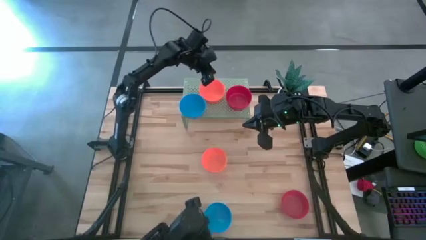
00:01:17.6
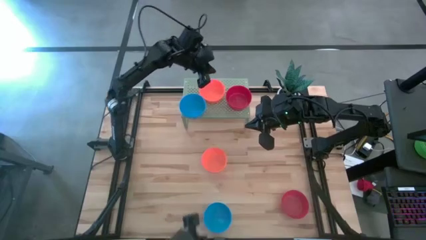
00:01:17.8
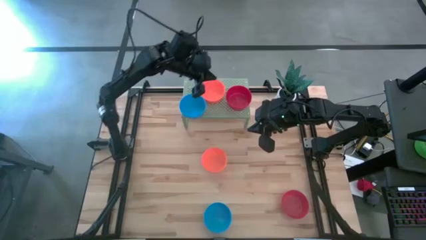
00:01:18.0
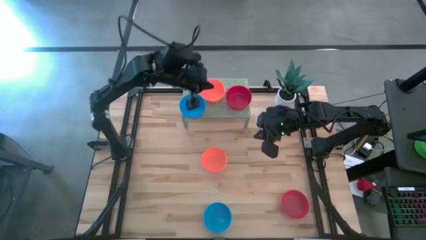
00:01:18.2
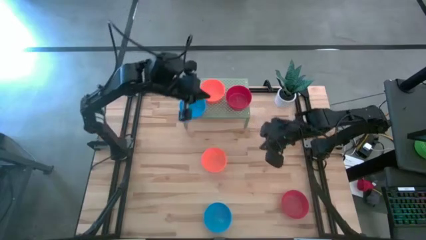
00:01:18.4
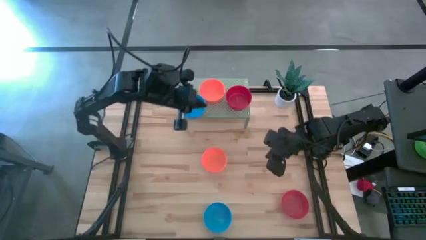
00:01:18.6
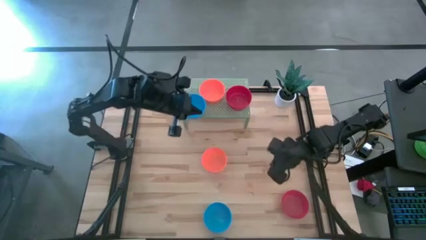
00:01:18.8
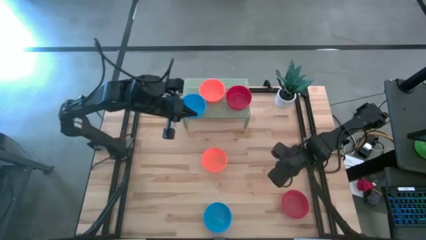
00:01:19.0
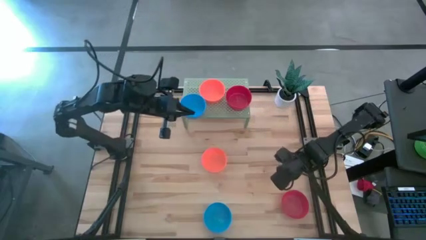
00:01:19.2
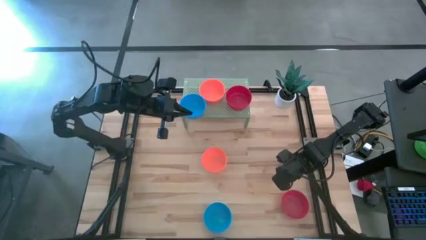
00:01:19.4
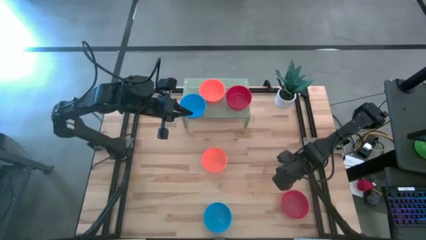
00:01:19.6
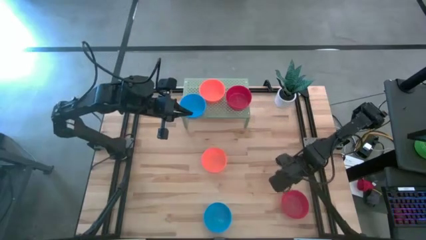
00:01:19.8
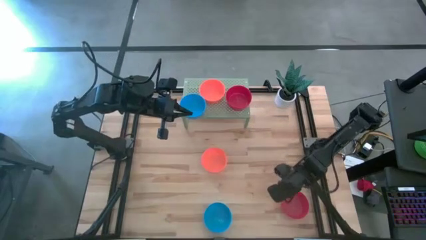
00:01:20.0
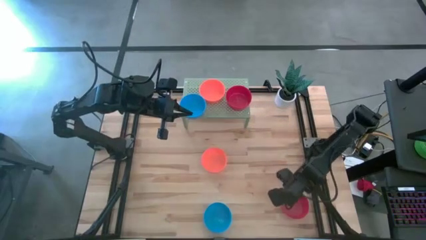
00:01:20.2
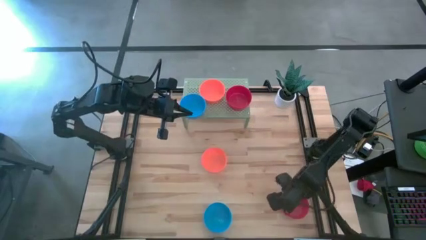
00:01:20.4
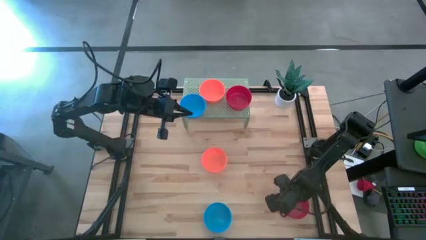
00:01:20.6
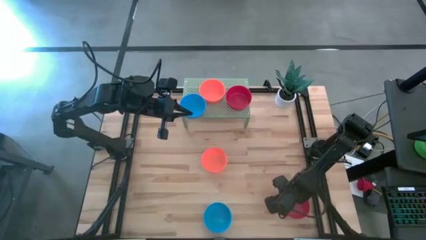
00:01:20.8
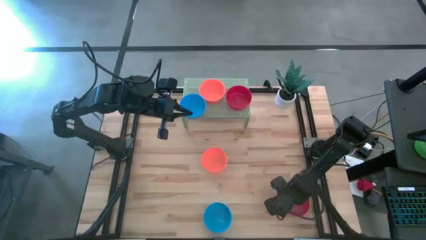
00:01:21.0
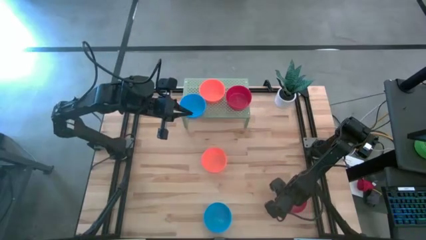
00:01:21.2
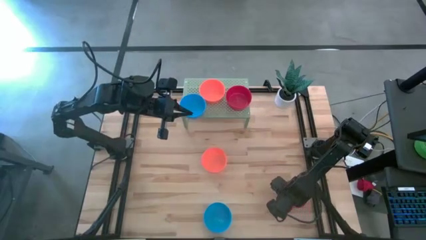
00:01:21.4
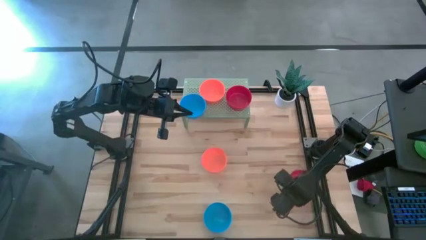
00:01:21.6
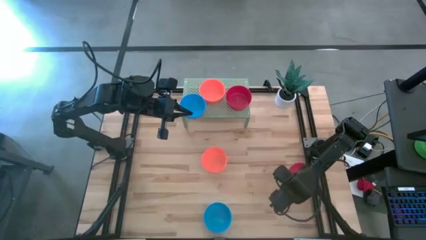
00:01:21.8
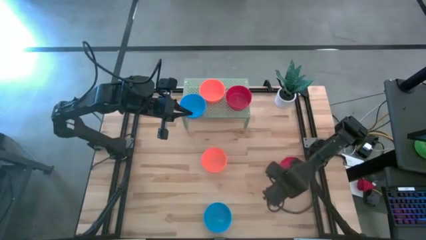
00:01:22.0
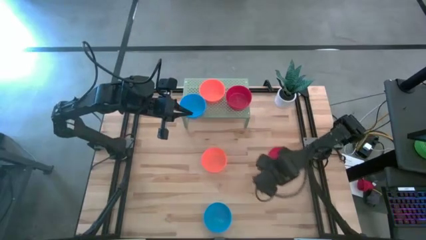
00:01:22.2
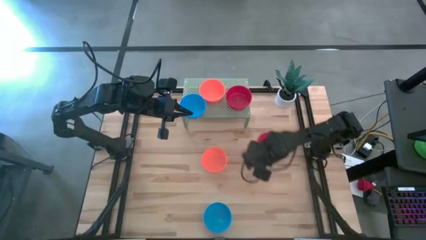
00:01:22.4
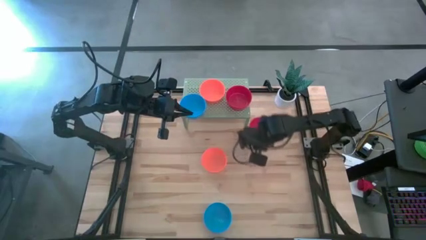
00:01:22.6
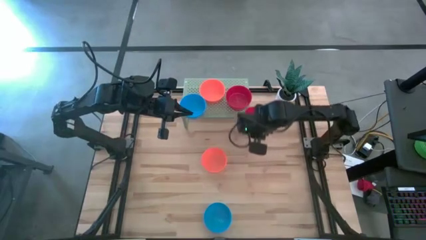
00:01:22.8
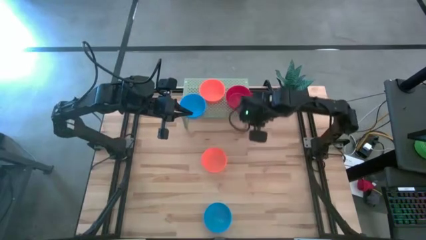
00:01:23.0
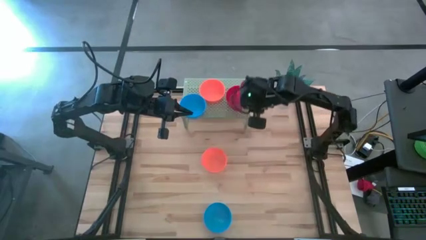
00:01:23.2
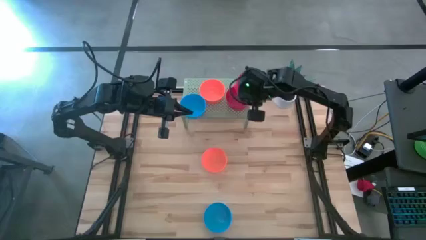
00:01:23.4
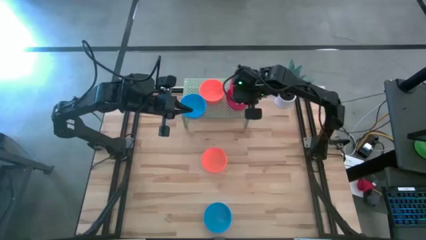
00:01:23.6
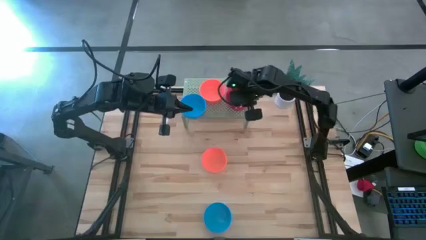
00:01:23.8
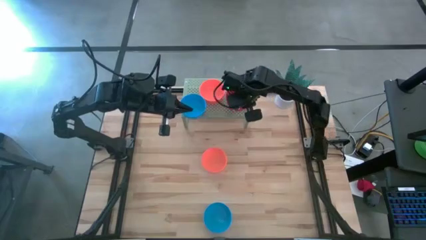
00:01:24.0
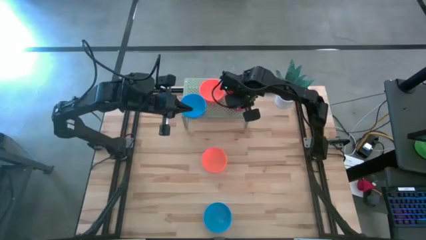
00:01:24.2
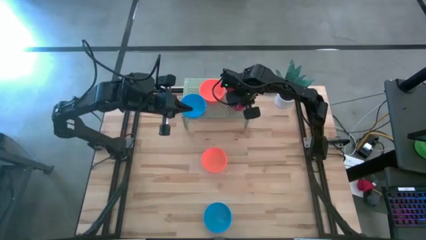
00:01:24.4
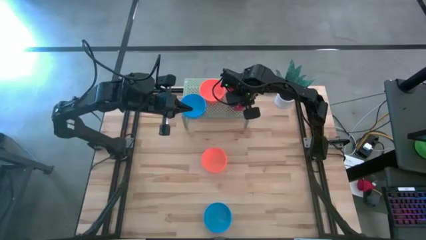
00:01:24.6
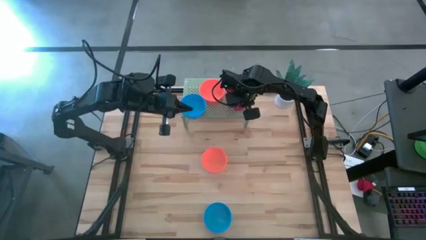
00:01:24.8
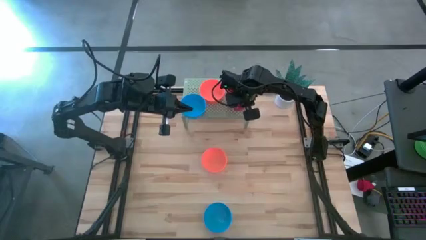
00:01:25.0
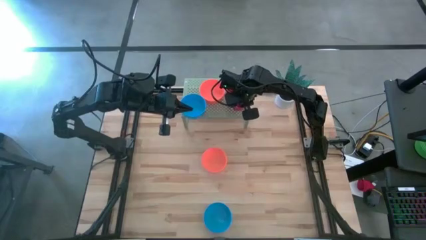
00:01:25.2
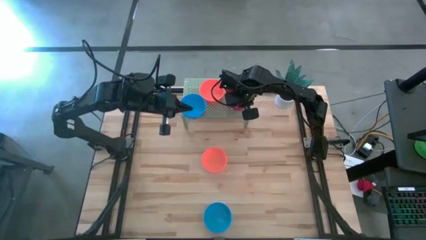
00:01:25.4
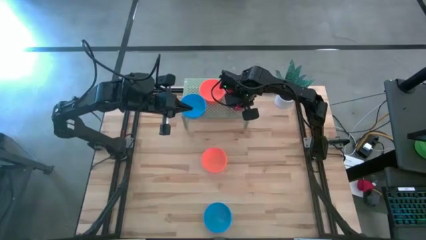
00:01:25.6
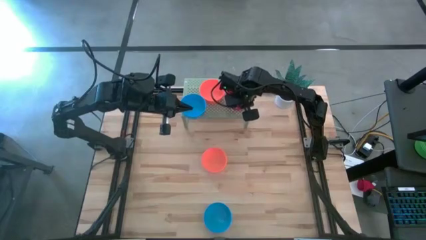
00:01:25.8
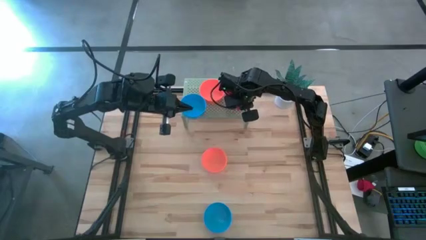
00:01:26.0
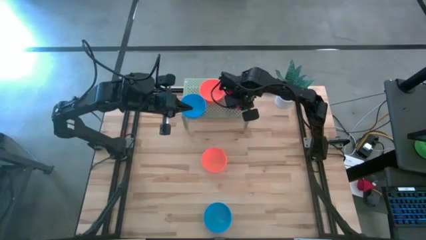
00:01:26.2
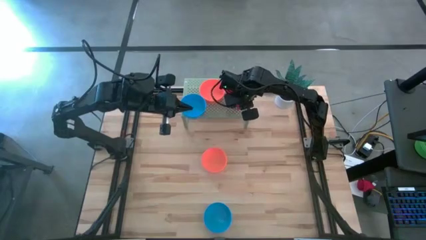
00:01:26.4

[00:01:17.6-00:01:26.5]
Task: Pick & Place Mini bowls
Stack the red bowl on the red bowls on the shelf

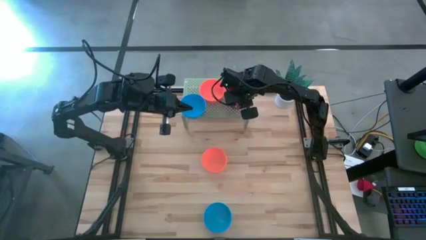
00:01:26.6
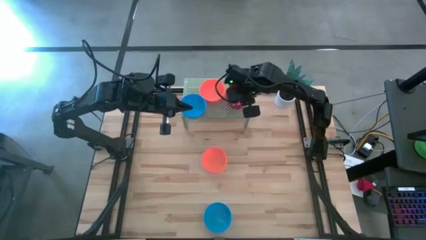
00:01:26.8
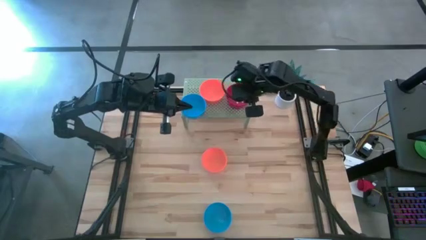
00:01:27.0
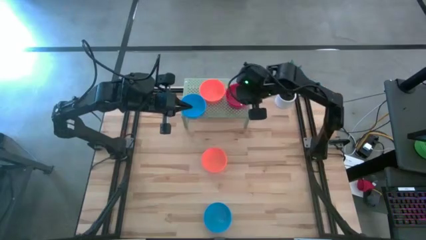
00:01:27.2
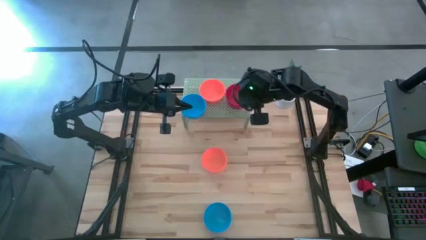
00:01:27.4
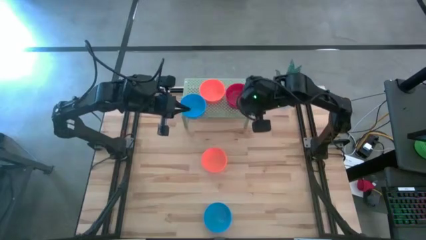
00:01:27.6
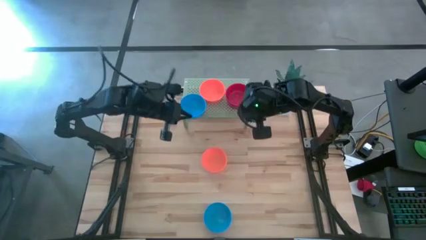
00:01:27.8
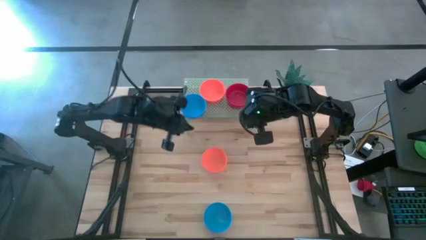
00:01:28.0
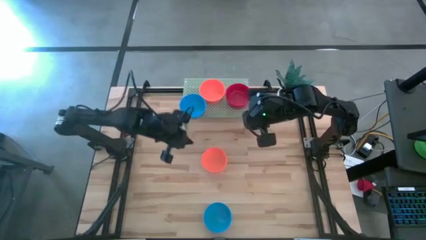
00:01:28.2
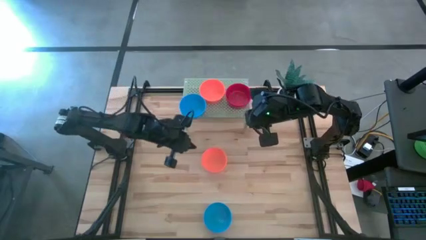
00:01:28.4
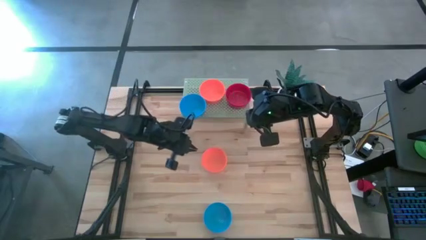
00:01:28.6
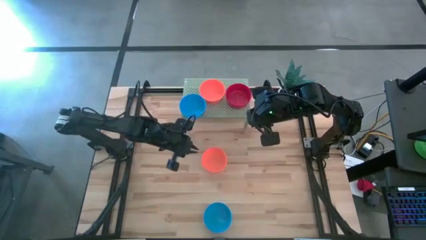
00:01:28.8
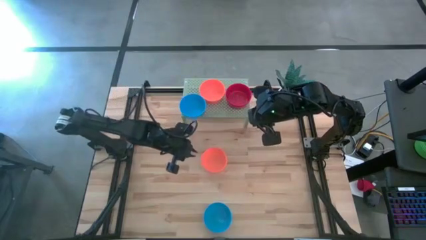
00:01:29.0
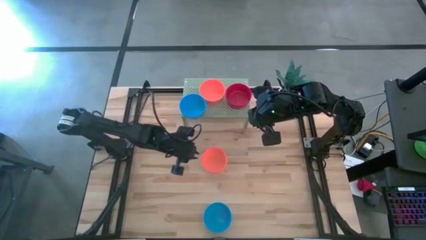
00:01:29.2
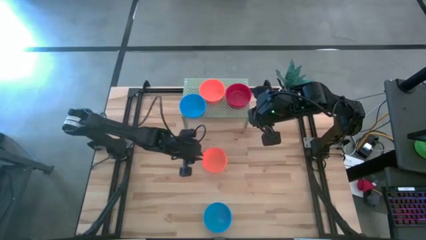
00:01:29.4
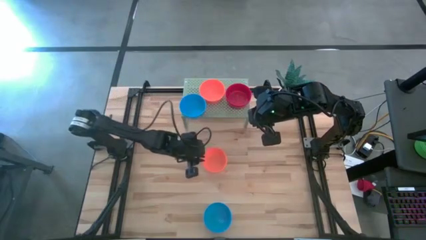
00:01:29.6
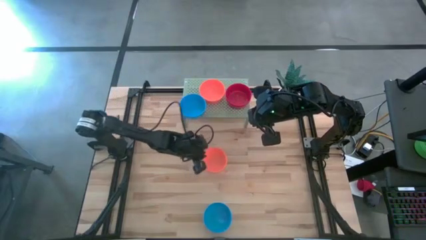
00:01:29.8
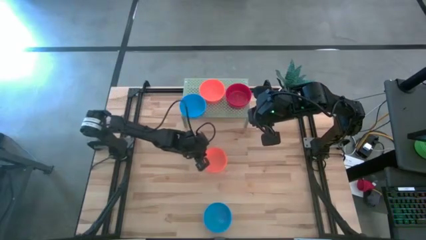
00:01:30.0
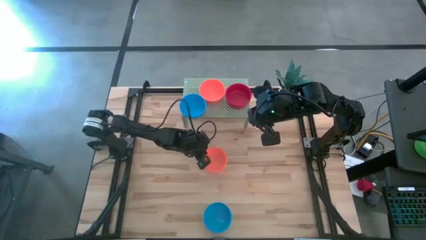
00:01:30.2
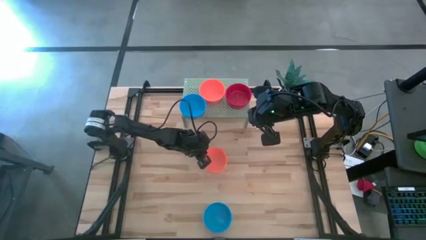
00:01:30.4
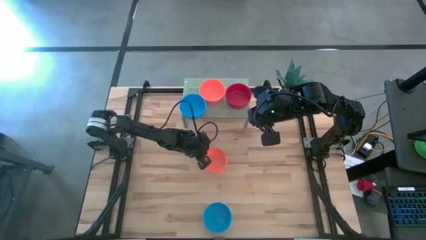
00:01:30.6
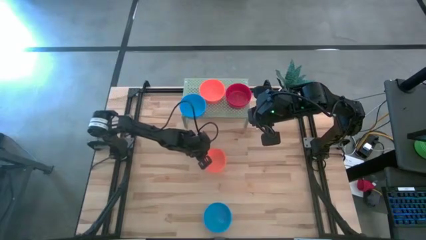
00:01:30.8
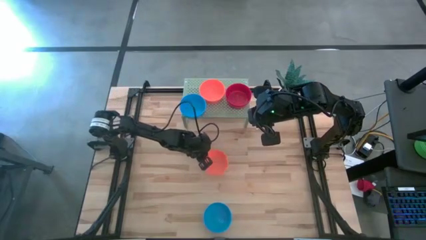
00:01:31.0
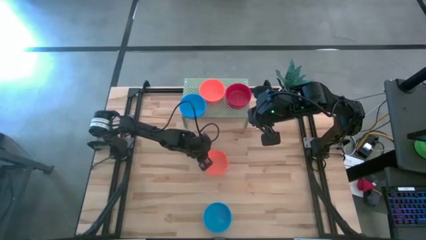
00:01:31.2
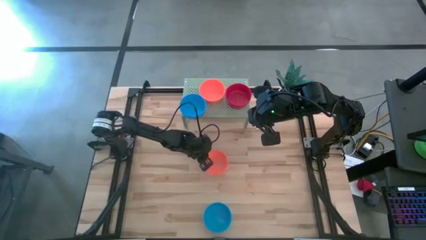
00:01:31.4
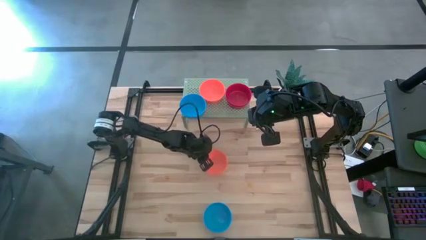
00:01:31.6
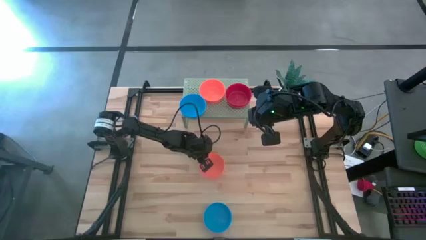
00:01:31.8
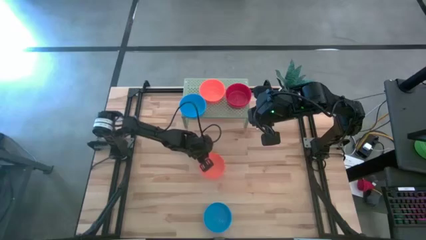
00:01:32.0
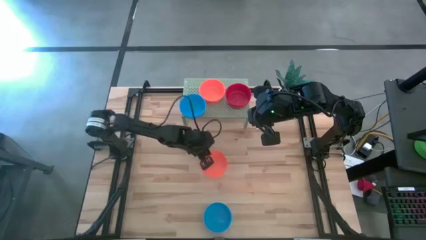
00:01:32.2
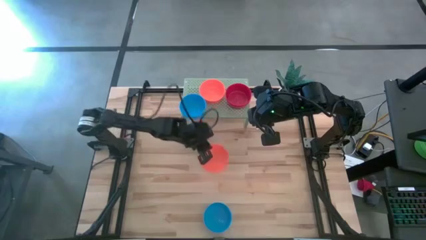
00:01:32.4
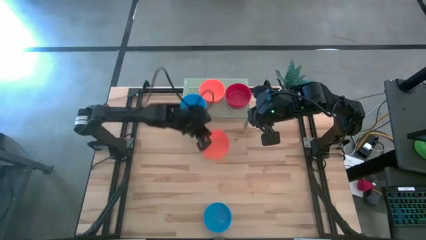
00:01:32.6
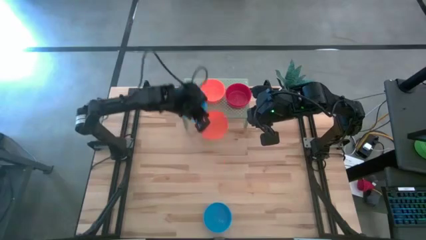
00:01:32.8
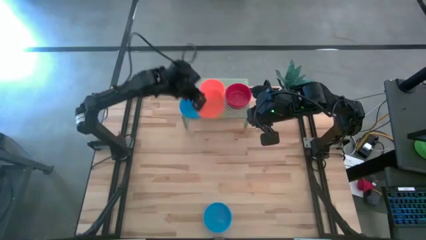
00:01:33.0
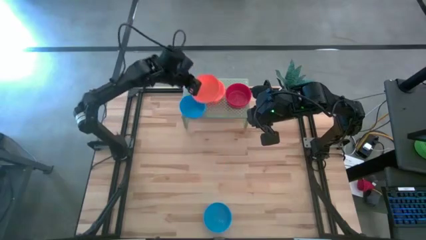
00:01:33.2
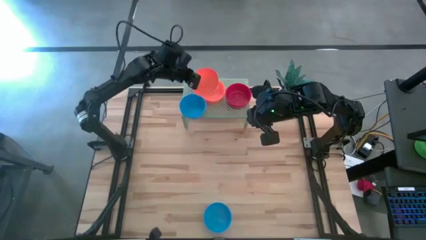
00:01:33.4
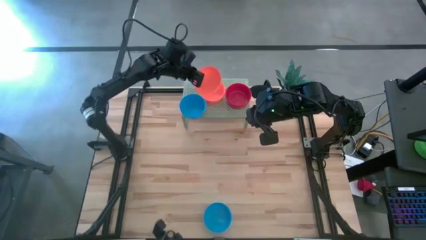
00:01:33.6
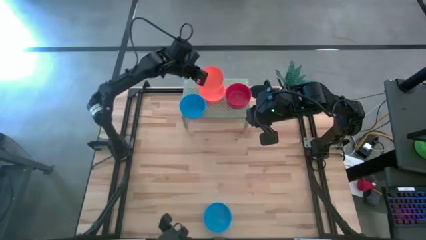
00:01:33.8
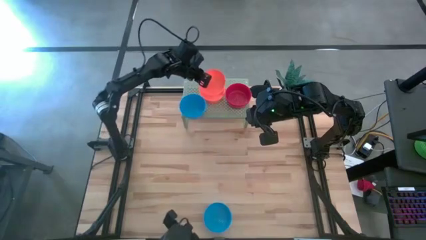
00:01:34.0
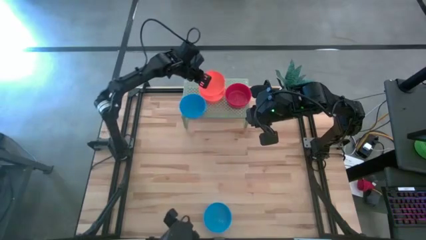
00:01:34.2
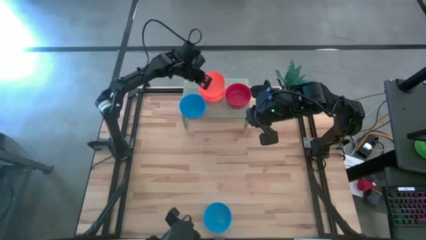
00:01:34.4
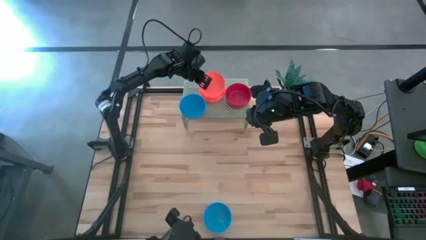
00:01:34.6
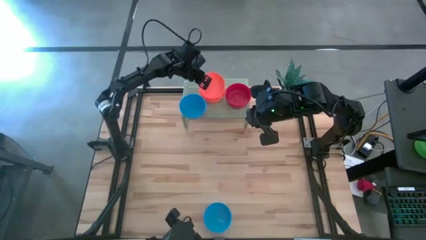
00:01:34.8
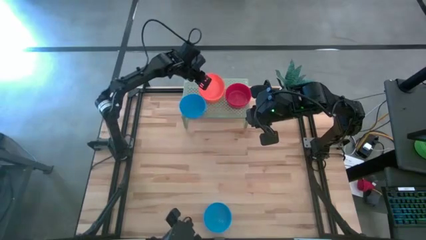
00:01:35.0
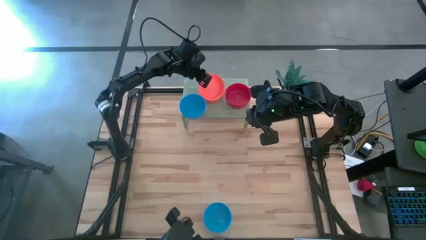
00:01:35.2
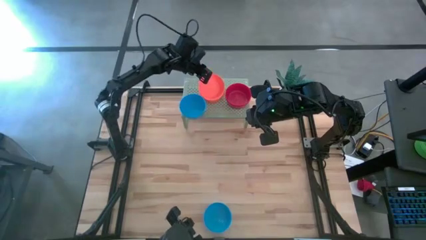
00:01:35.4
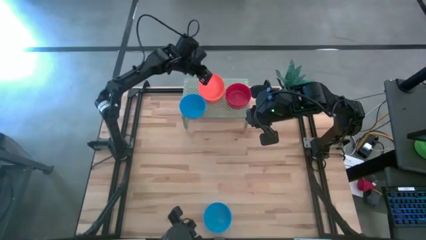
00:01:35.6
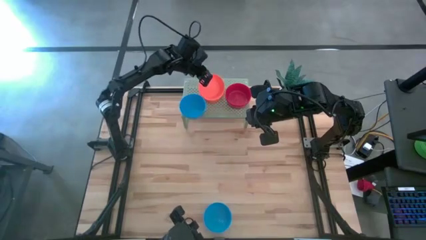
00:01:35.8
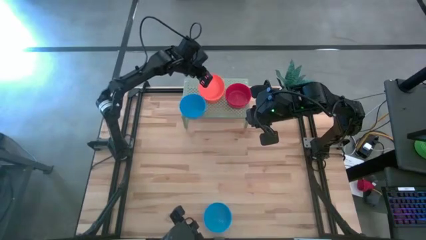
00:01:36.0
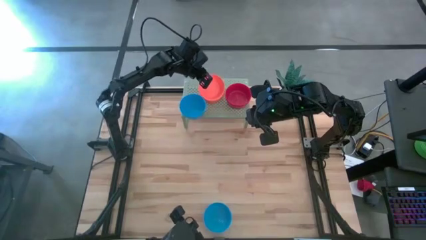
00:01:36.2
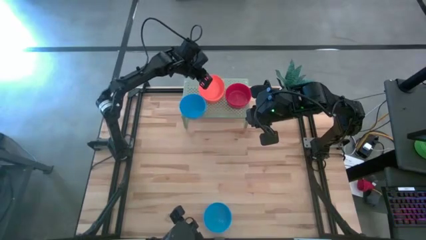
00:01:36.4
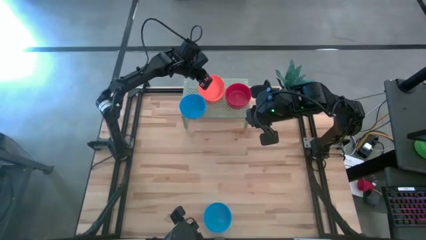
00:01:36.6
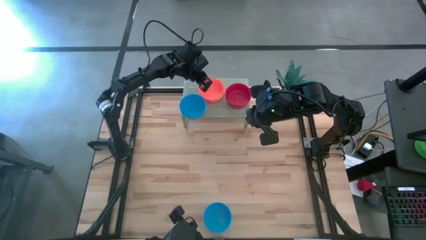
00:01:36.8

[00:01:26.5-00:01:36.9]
Stack the orange bowl on the orange bowls on the shelf
